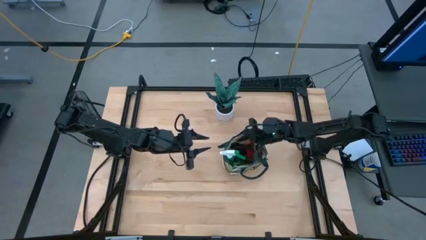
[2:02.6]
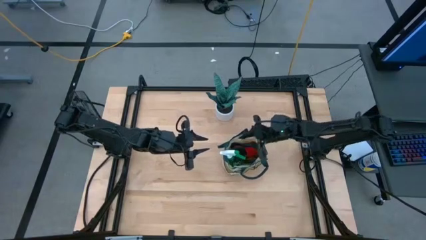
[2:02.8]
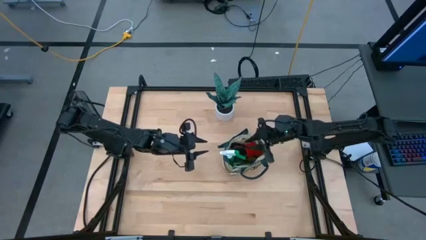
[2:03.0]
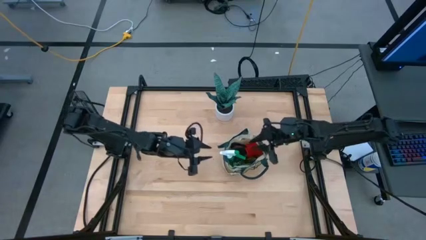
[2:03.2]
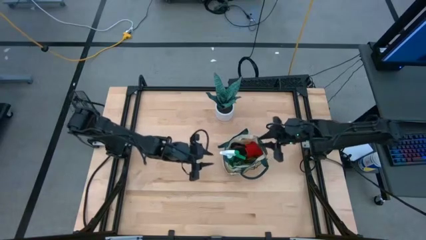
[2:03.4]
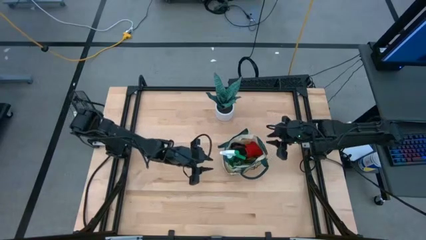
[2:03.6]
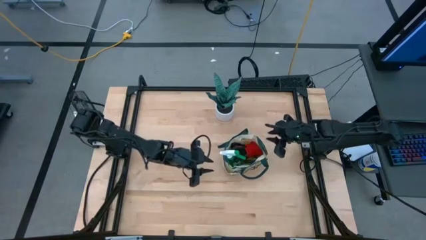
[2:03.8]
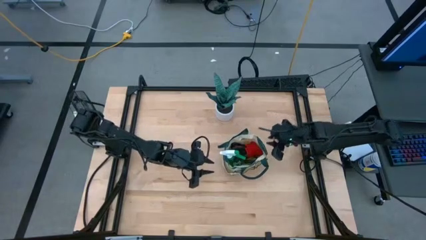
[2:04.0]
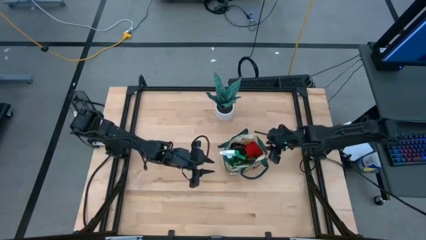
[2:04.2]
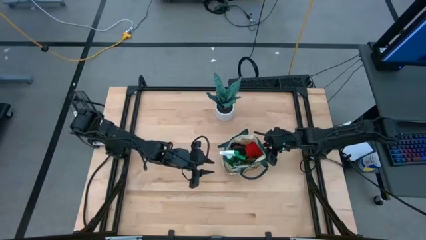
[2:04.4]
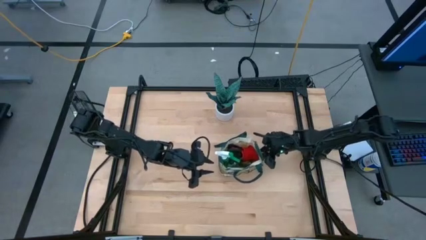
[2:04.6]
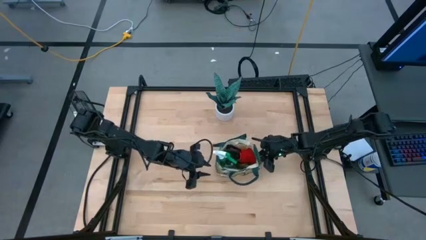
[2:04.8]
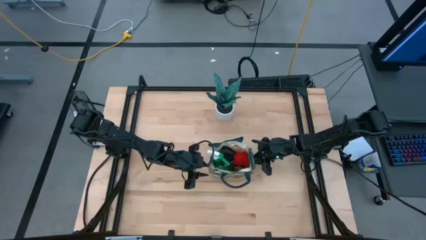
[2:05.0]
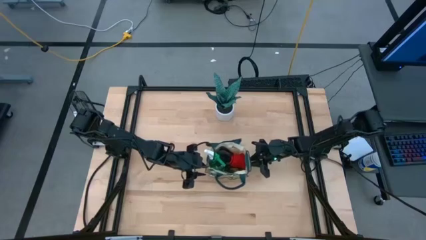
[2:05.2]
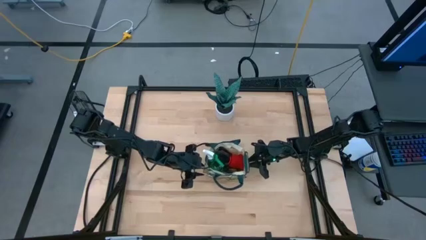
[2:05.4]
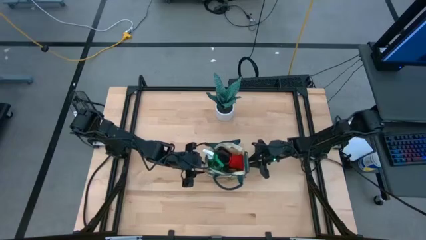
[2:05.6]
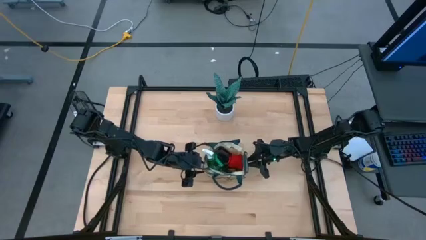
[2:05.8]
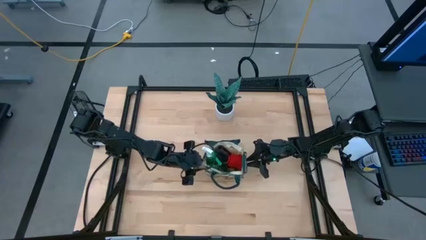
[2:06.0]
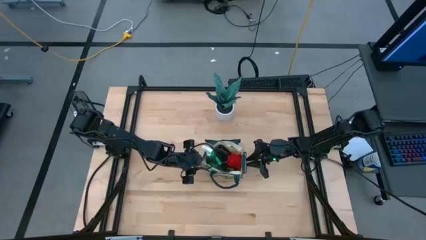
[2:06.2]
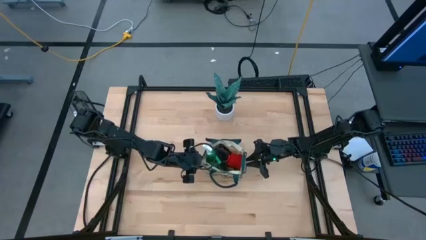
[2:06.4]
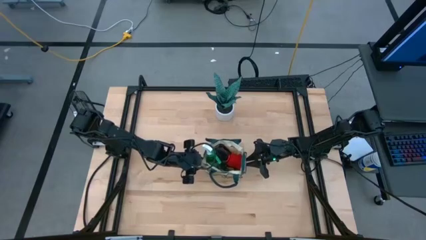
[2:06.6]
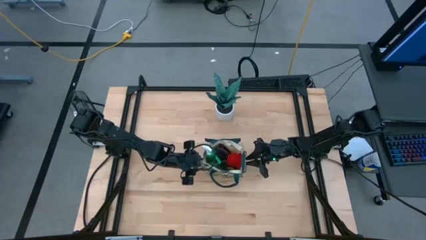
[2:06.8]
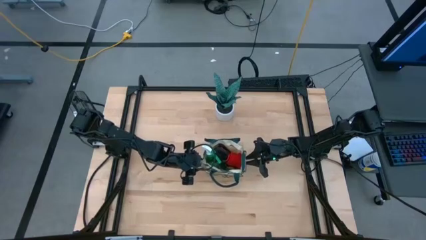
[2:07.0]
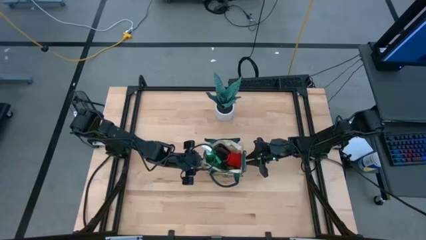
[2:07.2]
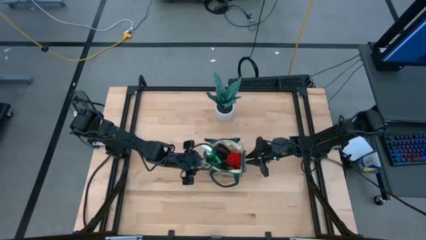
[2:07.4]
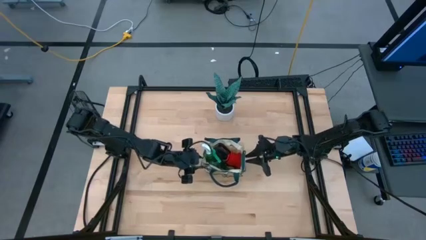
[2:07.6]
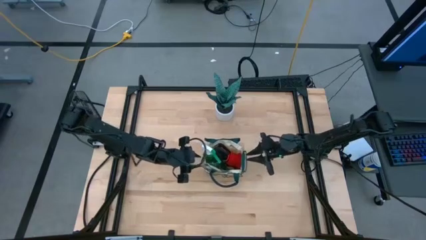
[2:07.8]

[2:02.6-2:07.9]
Task: Pick & Place Garden tools in Gardening bag
Adjust the gardening bag to the center of the table

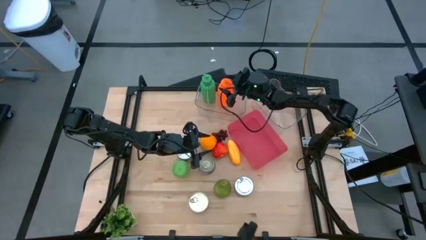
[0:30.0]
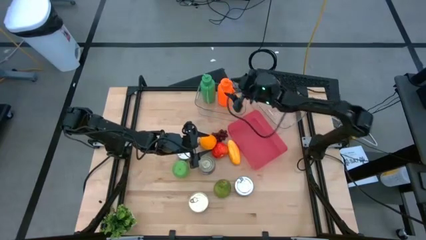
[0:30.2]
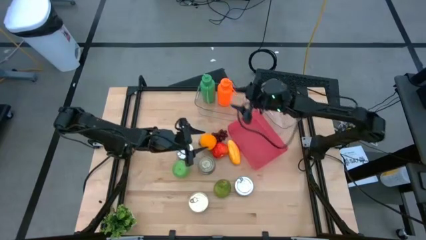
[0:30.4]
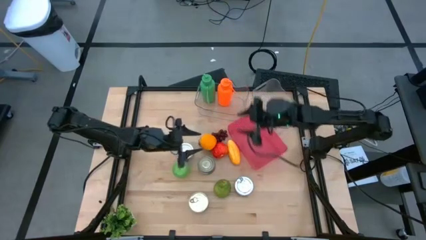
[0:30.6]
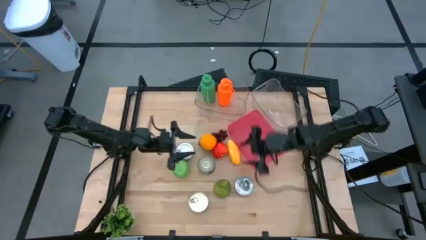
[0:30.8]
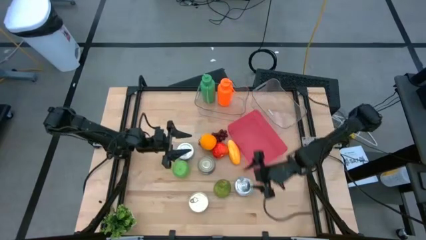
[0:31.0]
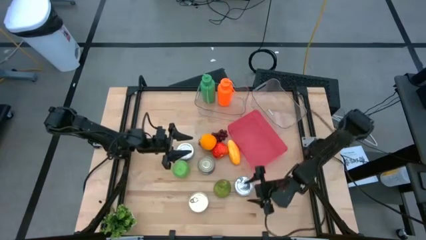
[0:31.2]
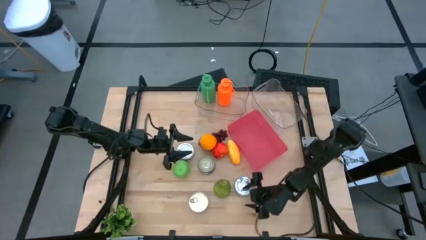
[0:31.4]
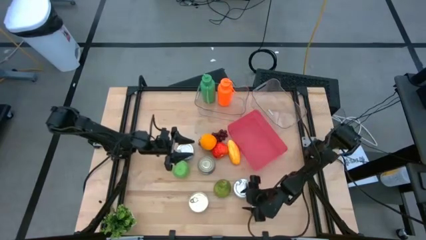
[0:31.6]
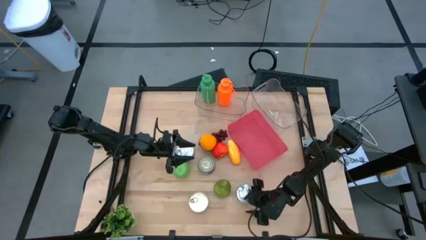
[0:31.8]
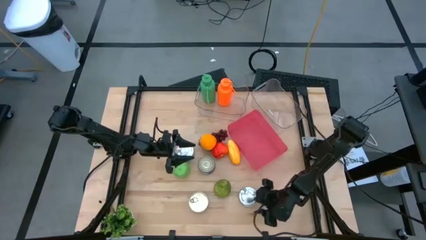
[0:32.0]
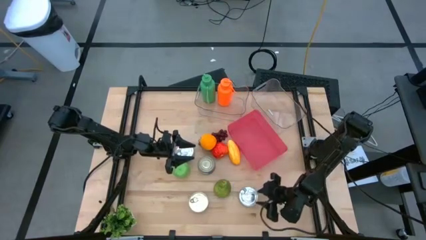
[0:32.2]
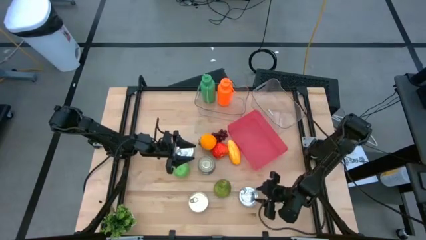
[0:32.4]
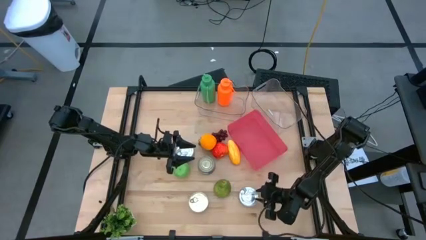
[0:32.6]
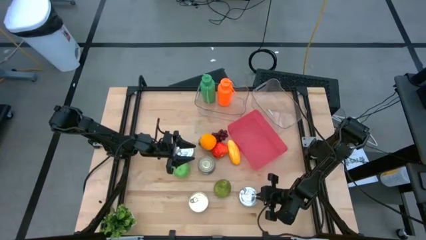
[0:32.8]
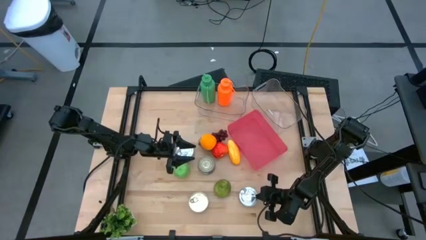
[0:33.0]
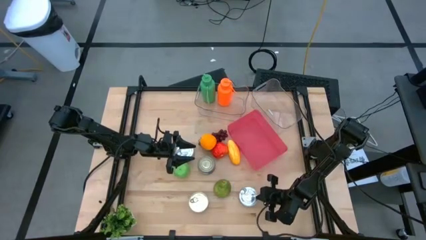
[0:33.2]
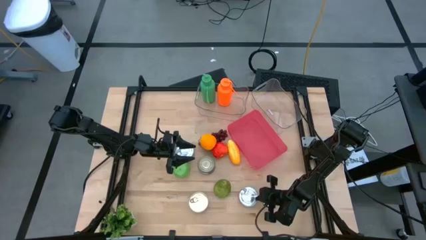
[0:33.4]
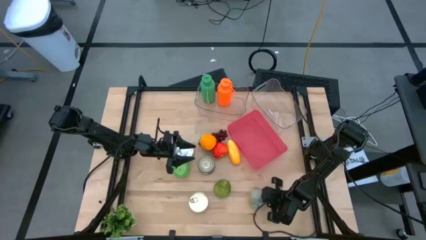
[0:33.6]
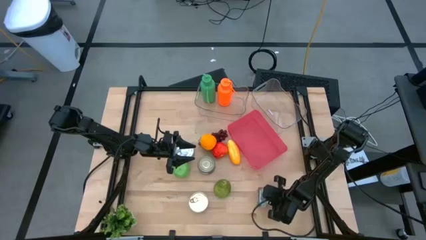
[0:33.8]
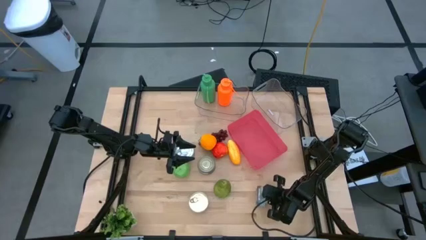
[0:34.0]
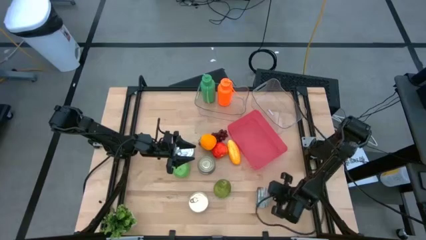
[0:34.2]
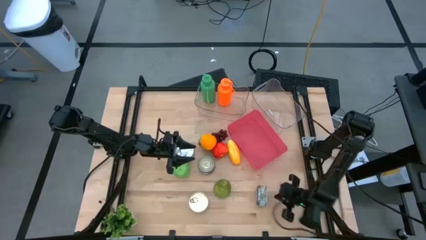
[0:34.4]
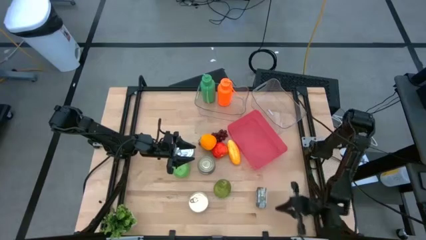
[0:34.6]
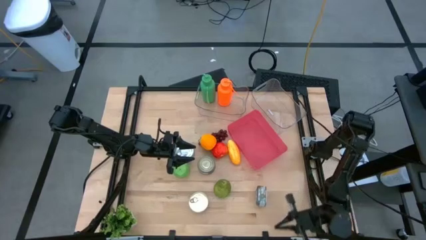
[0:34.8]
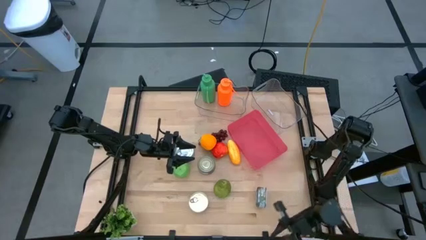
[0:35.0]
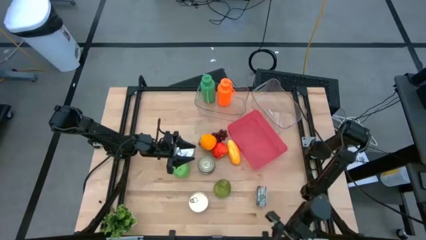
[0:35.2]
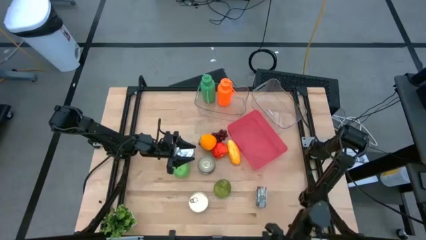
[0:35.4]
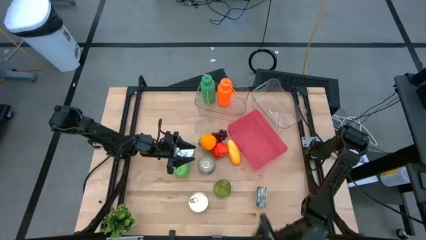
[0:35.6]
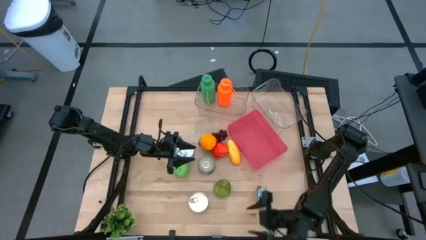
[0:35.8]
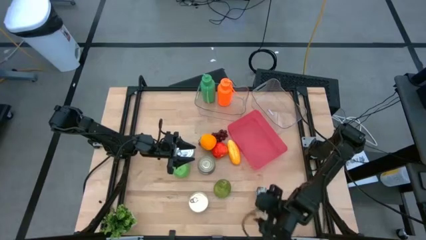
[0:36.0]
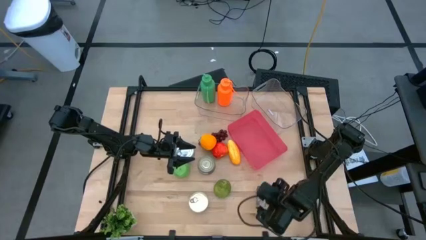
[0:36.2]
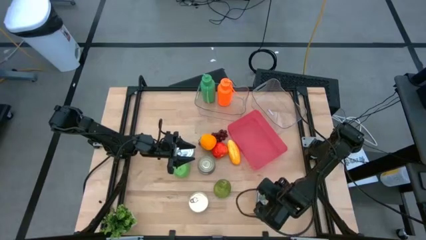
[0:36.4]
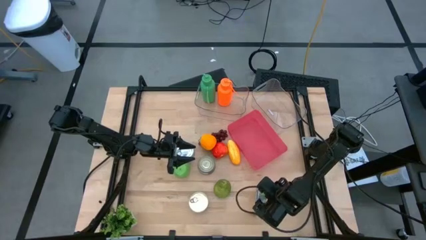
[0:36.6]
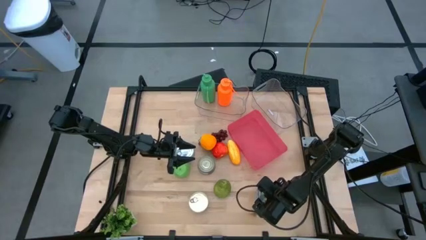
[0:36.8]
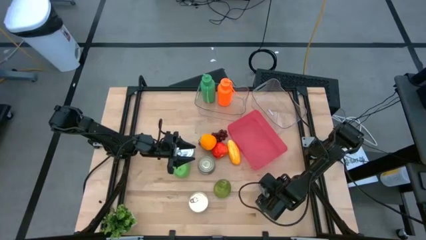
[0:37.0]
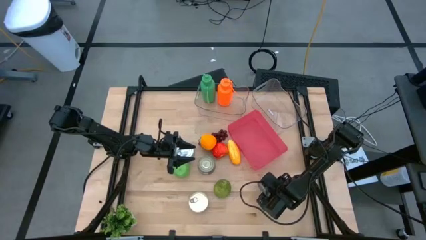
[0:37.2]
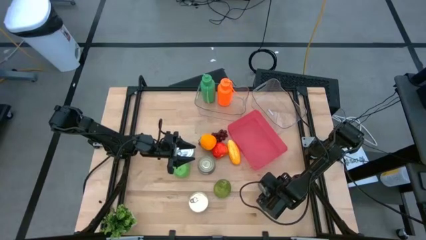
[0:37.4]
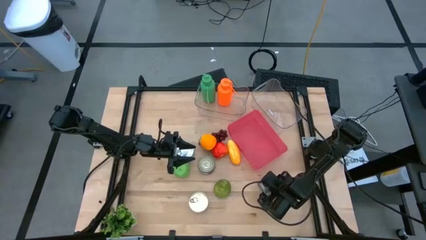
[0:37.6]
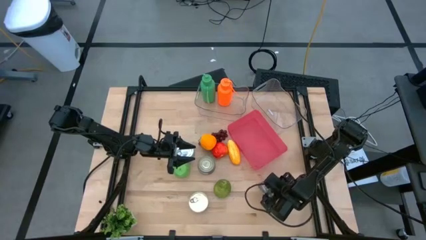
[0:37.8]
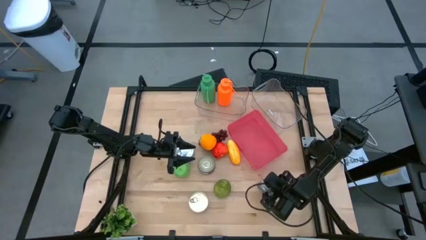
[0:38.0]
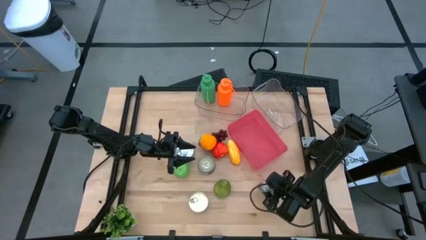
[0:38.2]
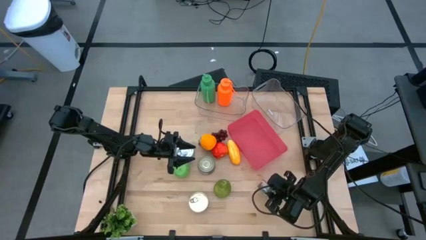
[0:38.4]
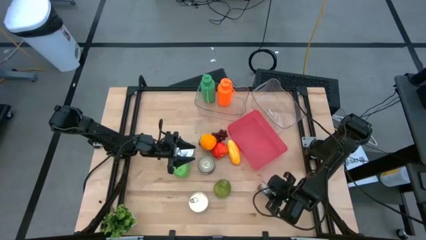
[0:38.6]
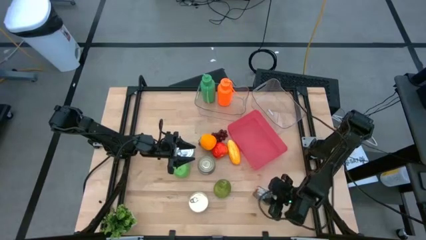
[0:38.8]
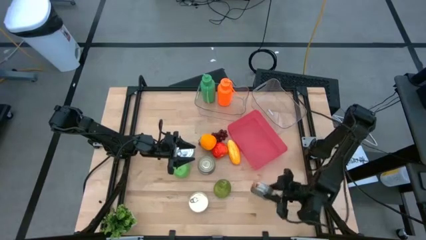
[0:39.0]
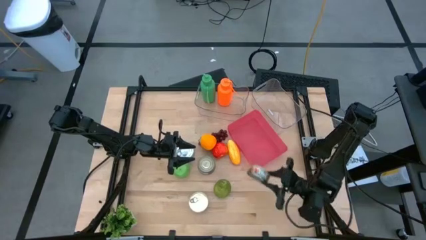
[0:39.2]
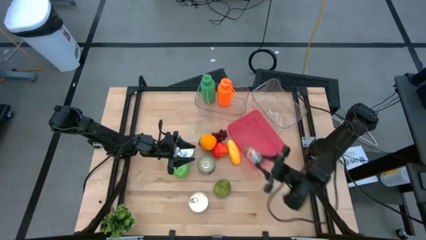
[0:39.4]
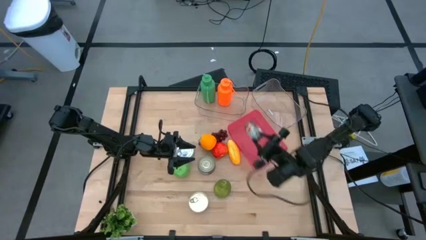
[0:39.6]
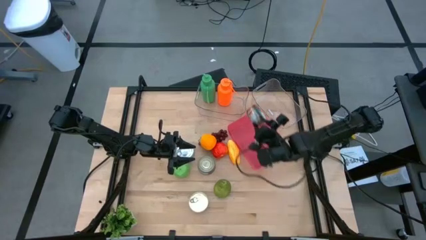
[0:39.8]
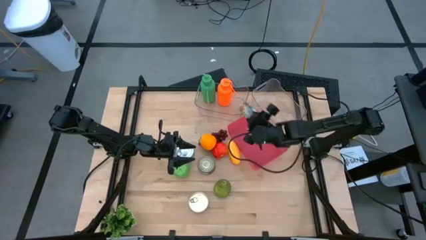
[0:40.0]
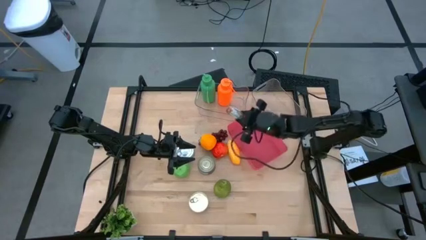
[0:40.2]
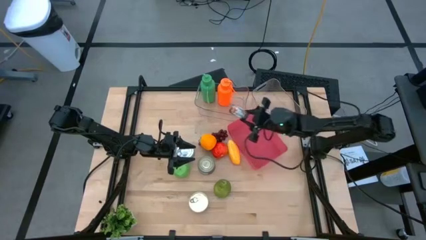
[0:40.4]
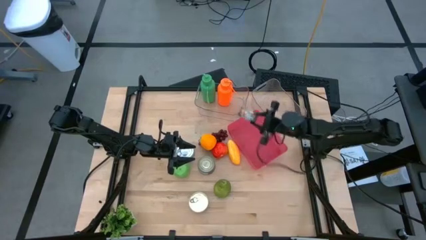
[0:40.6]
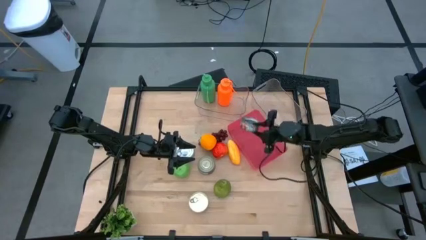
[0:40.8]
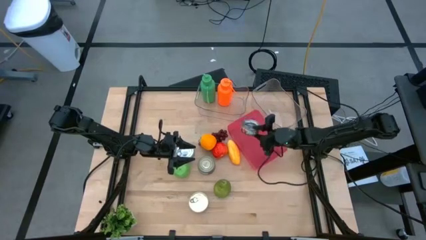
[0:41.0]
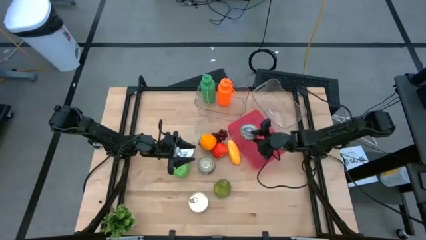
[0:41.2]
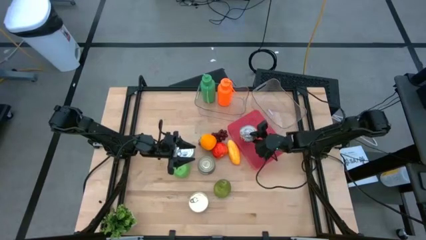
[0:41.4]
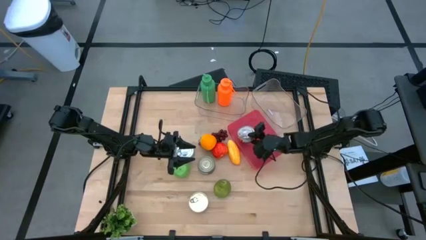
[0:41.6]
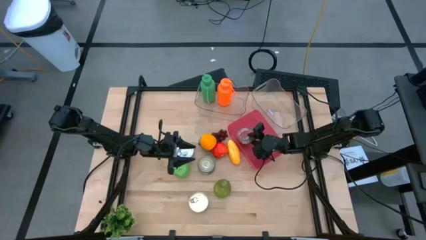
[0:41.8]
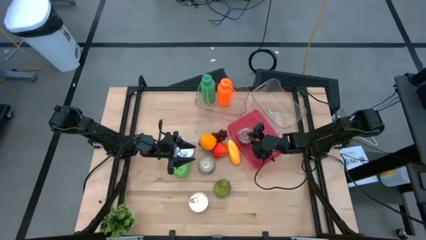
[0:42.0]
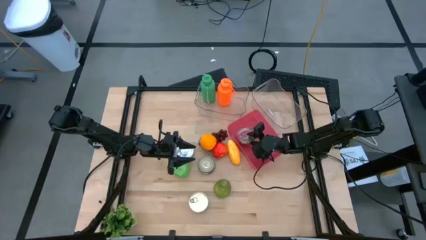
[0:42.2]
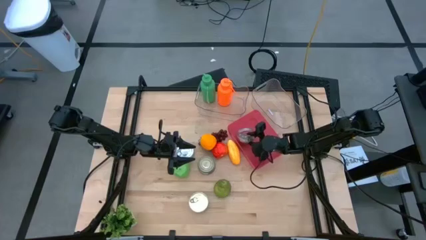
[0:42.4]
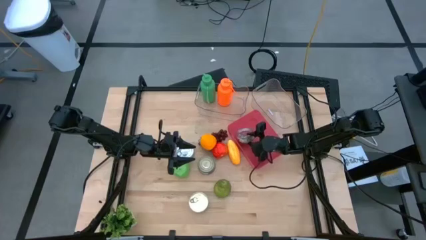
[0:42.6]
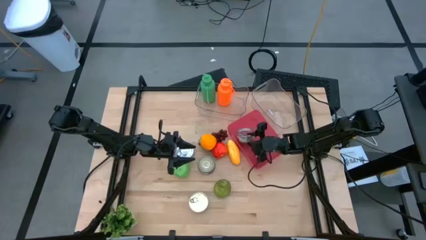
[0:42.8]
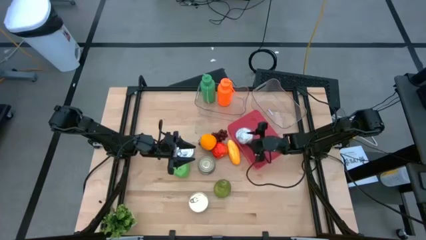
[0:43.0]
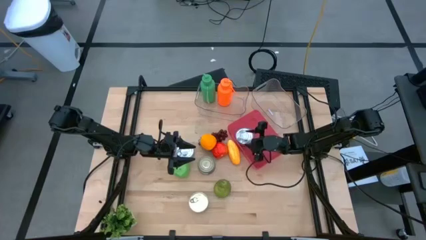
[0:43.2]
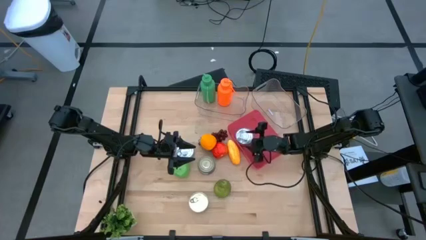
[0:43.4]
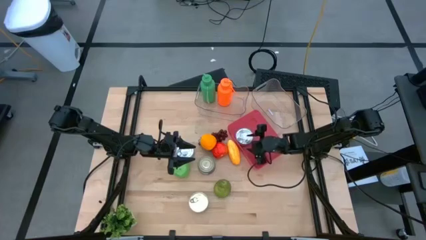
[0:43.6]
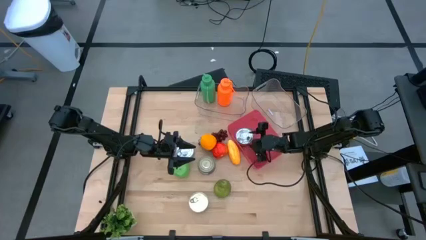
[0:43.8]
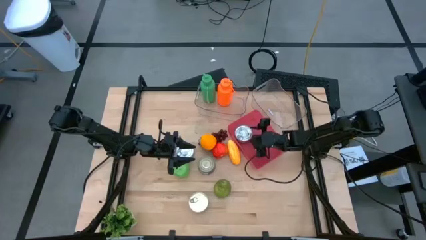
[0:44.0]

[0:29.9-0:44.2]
Task: Pick & Place Food Item
Put the right green tuna can into the pink bin
